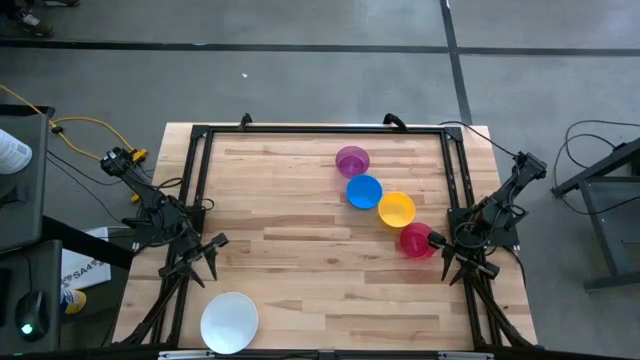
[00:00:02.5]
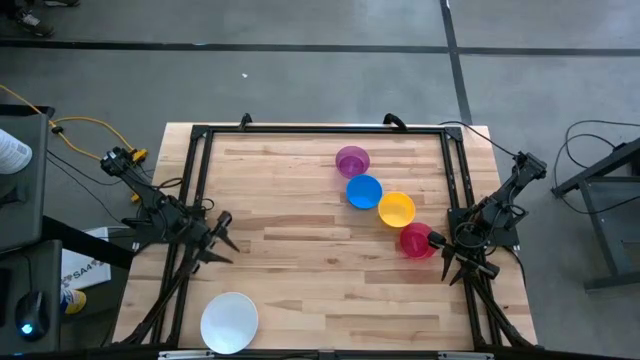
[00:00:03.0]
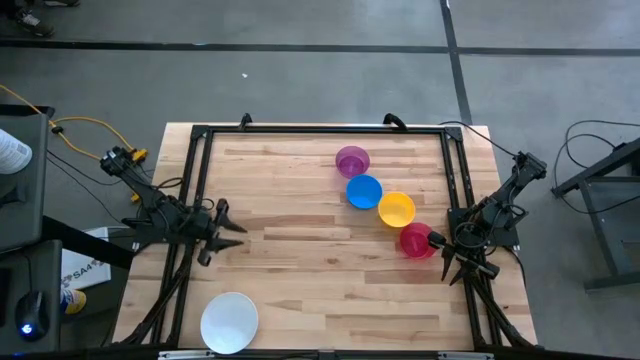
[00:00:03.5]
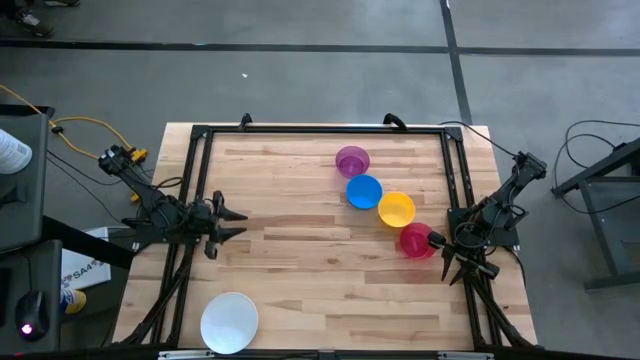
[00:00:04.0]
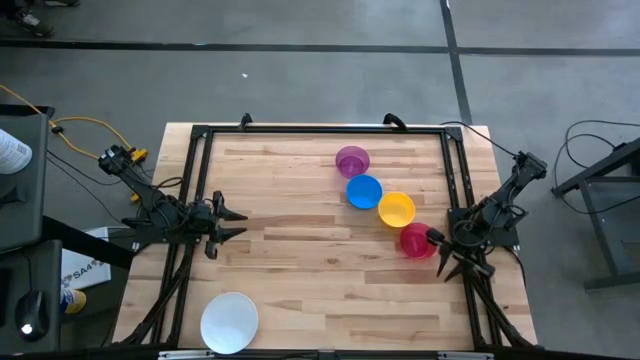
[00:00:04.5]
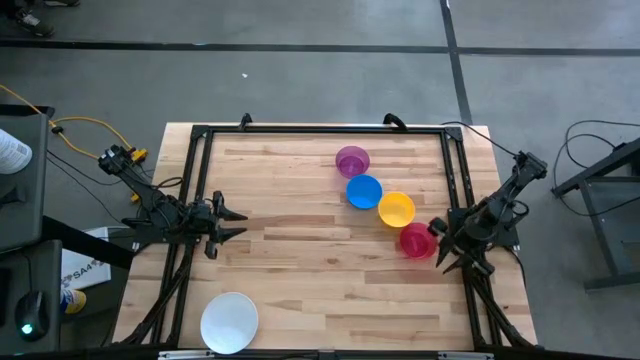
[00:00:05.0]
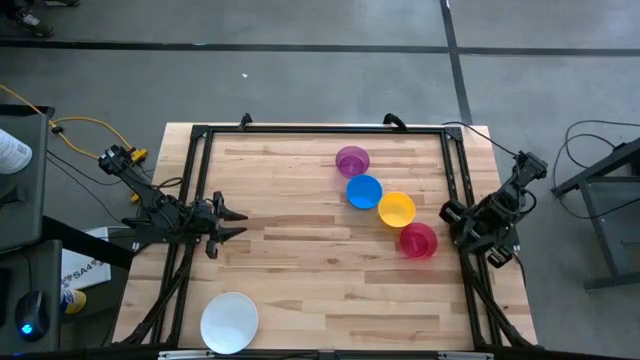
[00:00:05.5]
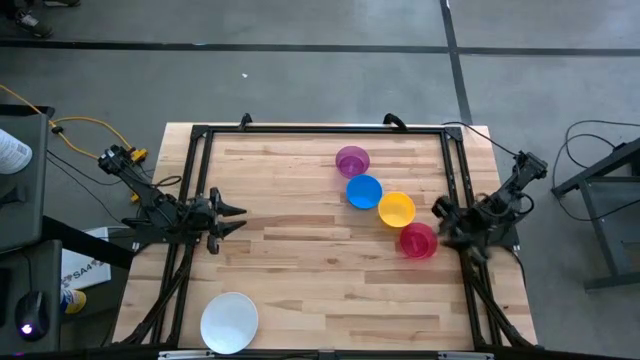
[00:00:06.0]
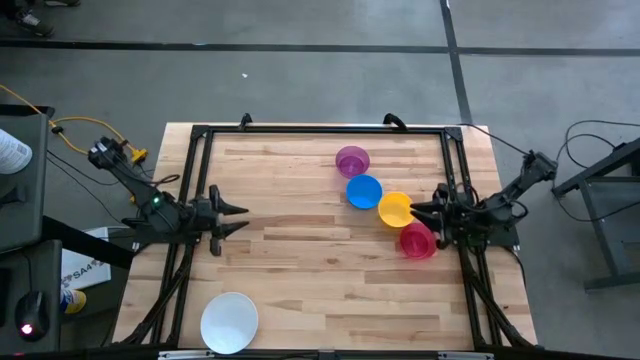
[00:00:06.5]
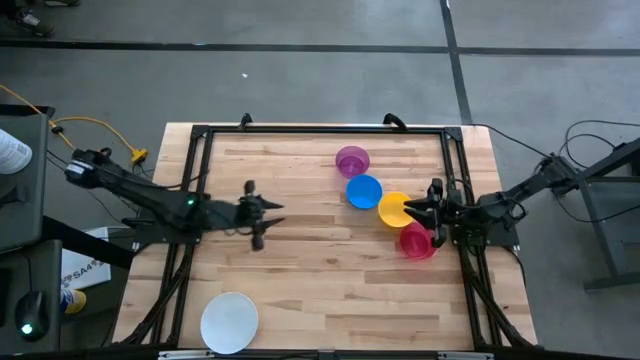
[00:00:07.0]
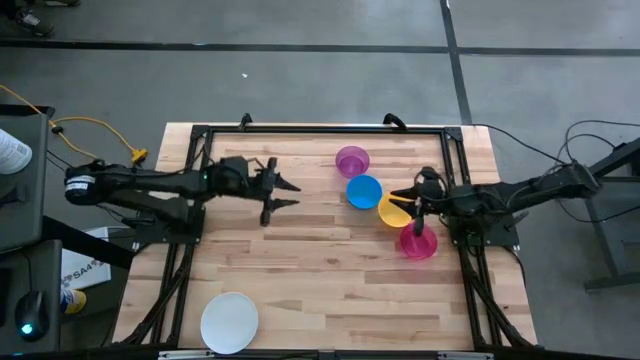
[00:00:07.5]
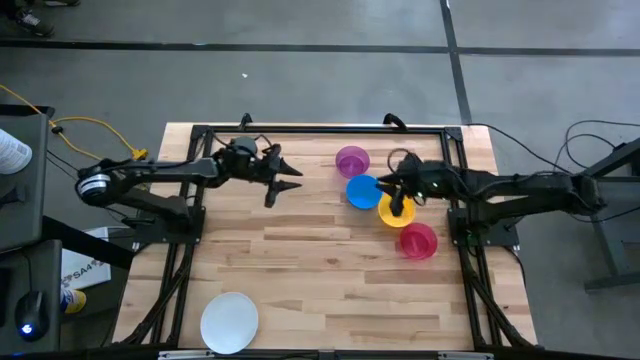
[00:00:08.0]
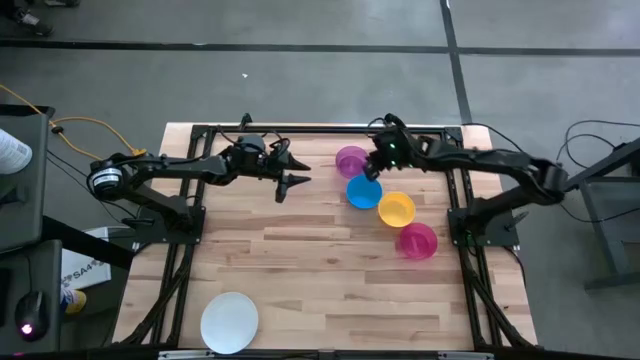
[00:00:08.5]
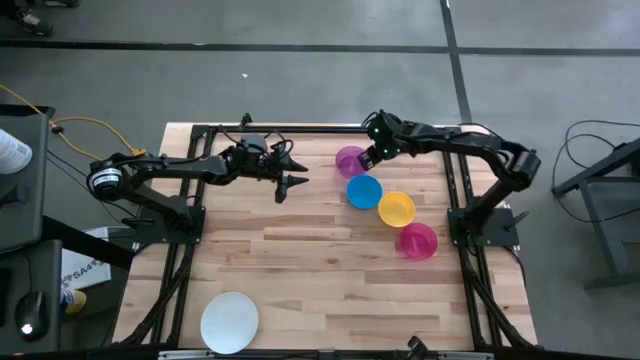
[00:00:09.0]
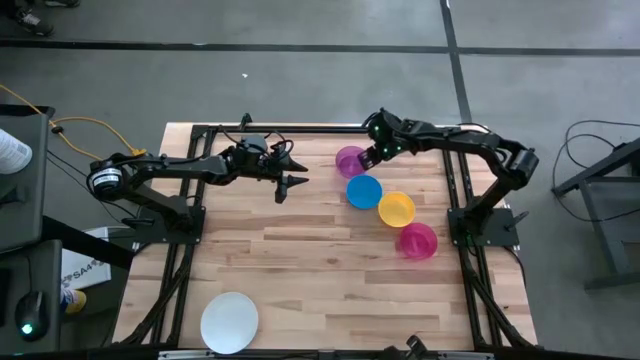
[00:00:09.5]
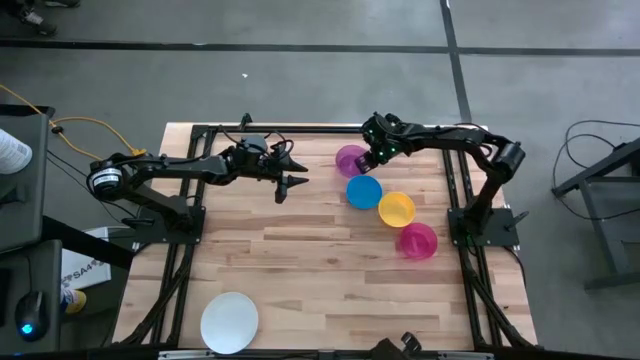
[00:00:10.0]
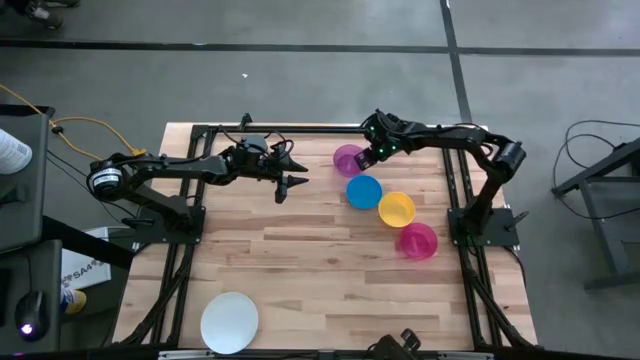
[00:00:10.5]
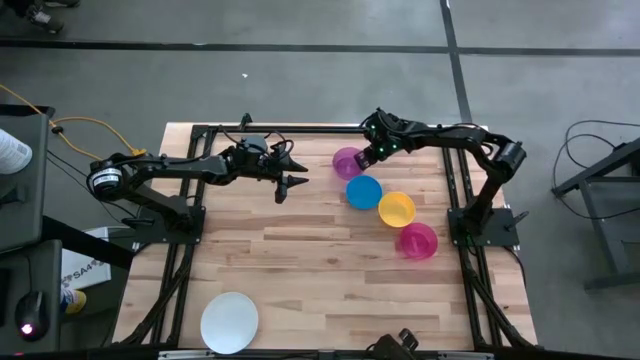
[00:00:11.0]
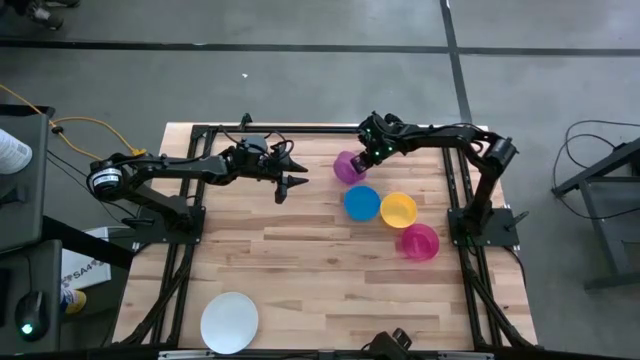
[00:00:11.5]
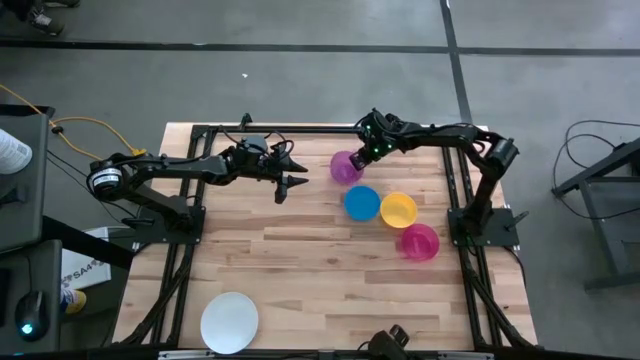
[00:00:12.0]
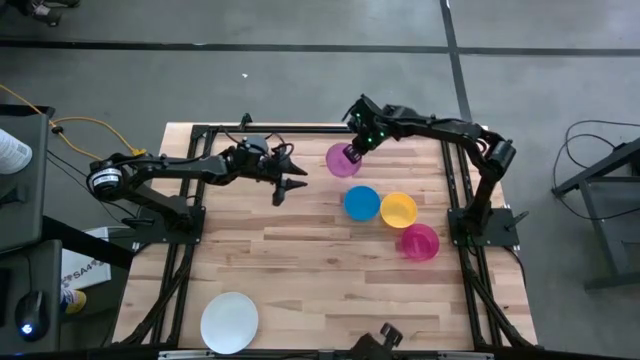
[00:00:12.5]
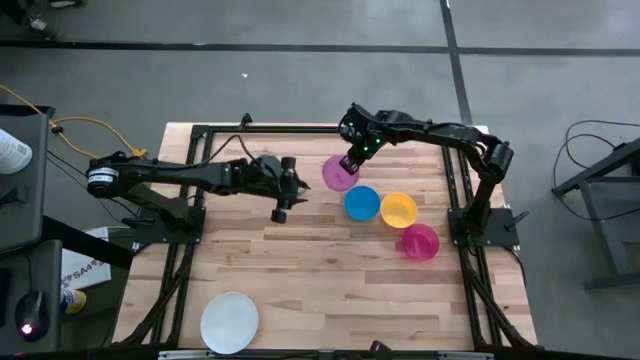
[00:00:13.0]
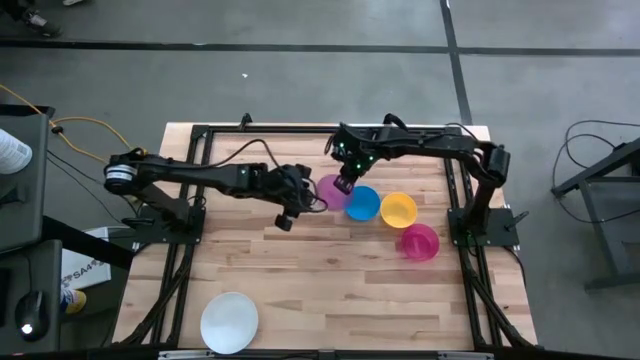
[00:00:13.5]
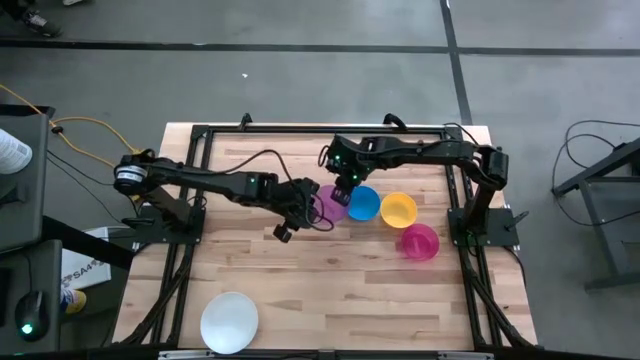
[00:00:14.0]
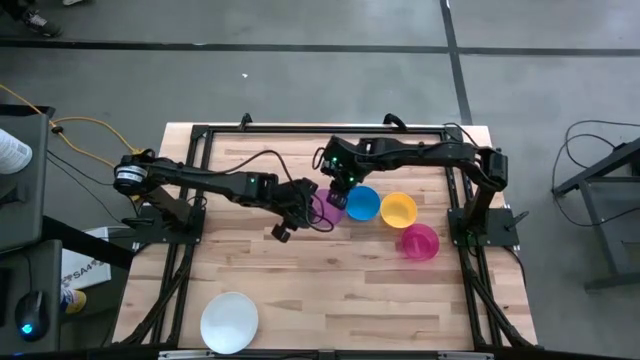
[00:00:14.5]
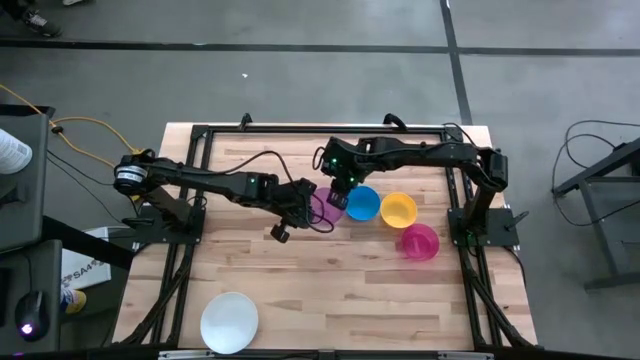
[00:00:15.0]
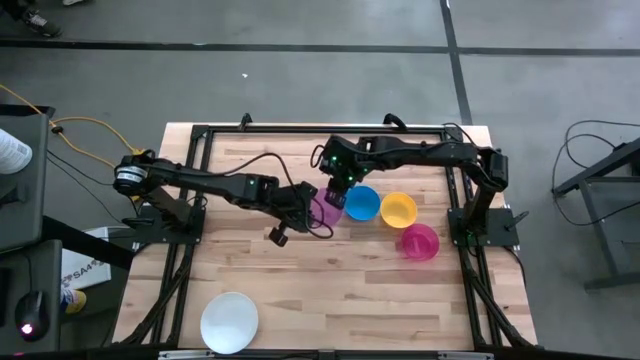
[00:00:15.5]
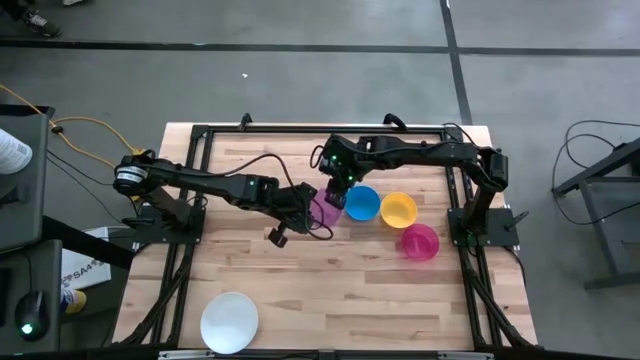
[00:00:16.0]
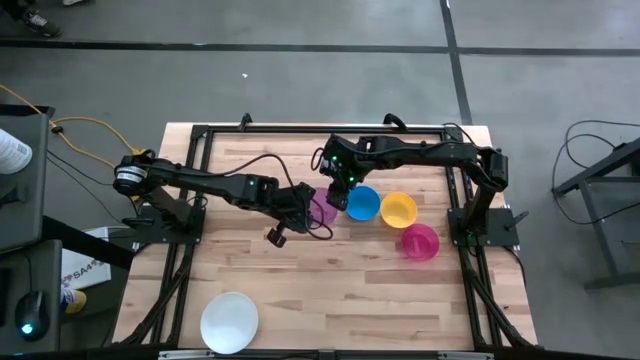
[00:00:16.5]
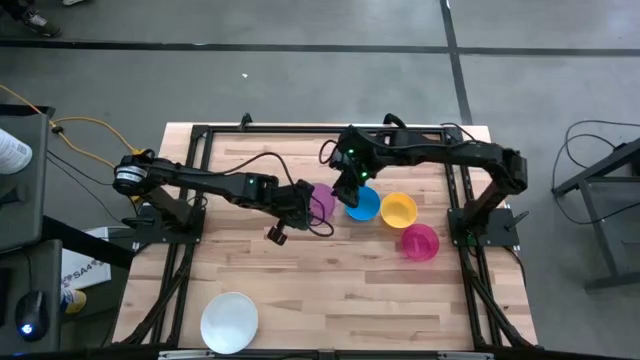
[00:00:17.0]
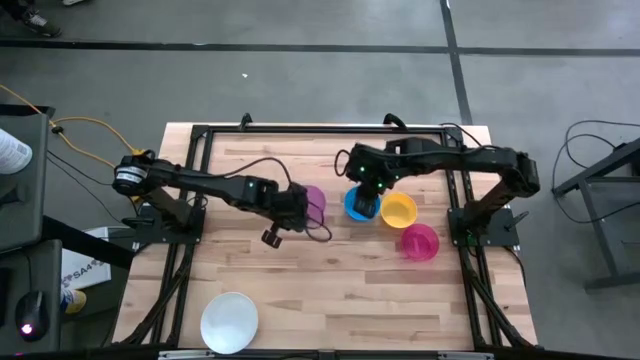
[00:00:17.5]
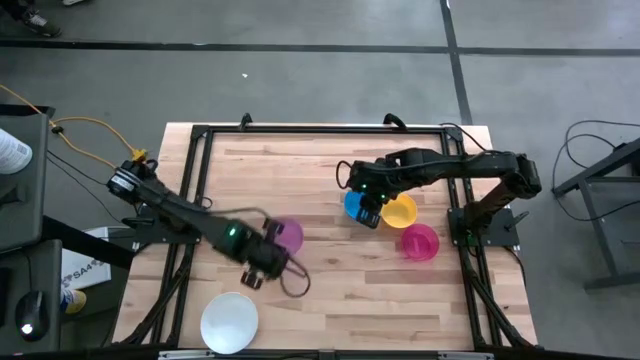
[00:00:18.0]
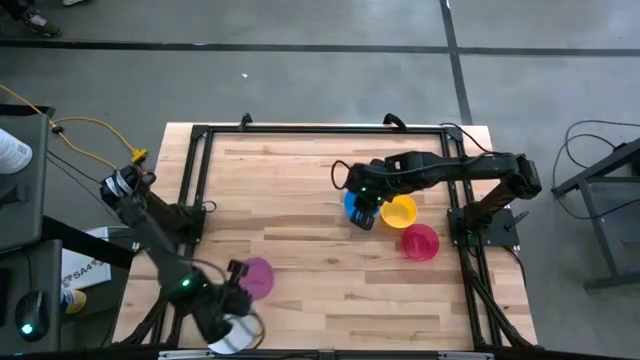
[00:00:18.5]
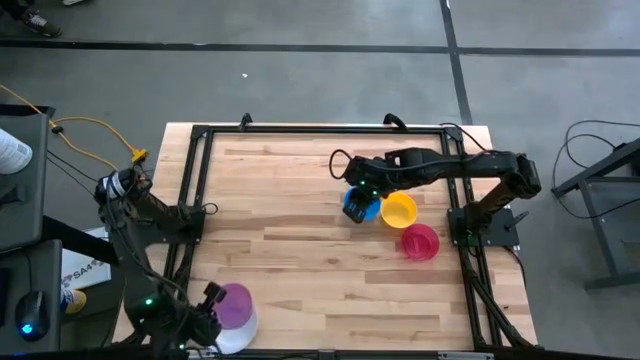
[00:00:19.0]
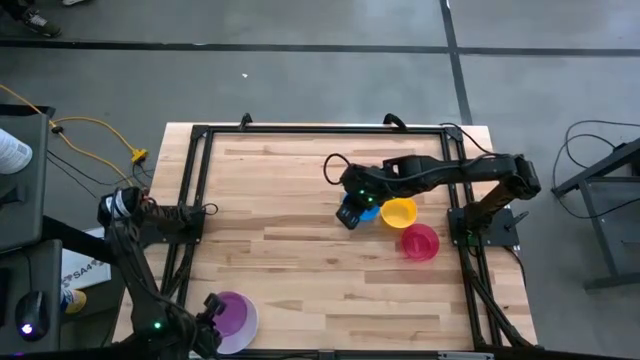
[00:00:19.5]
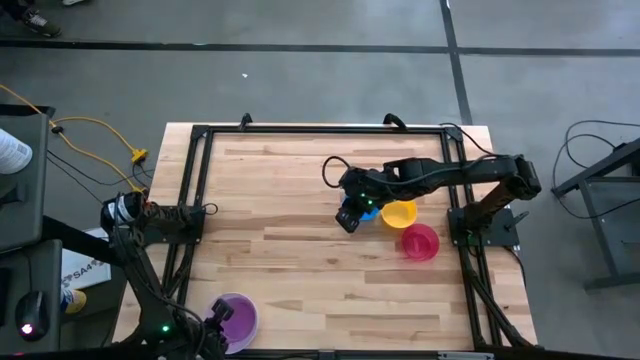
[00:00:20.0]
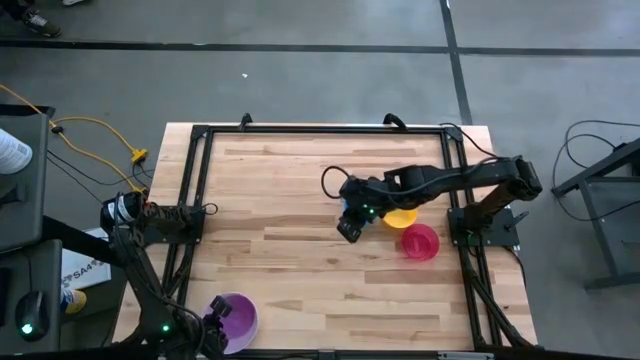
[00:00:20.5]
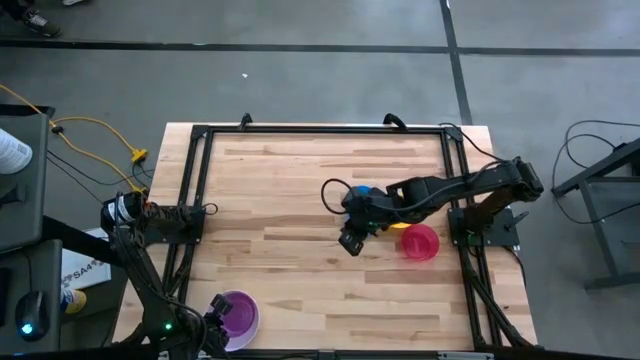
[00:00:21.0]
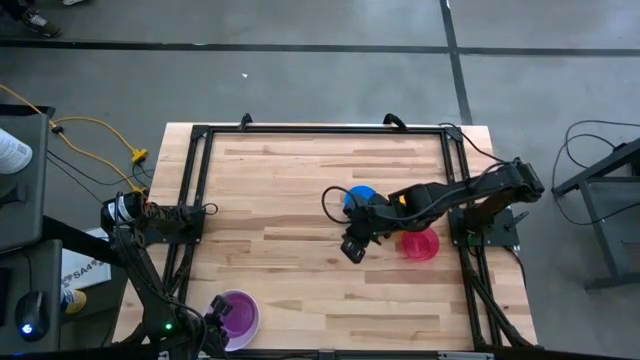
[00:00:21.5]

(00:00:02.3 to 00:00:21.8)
Stack the violet bowl on the white bowl
